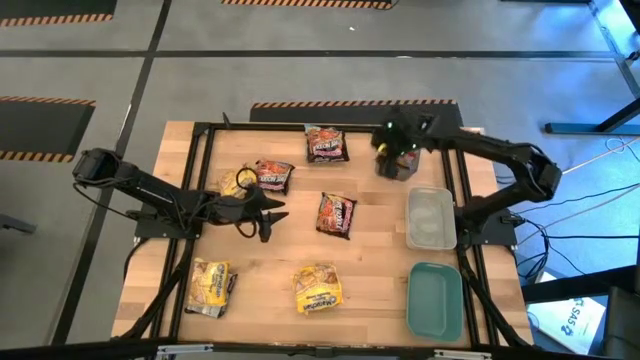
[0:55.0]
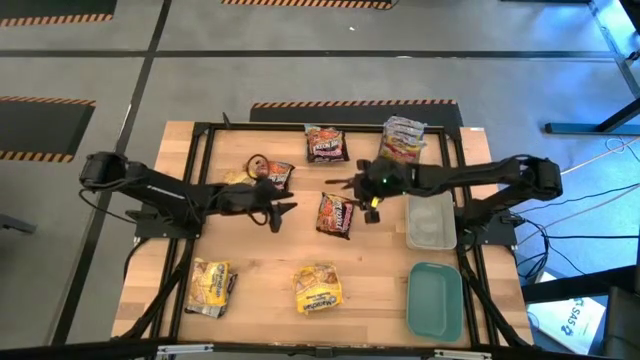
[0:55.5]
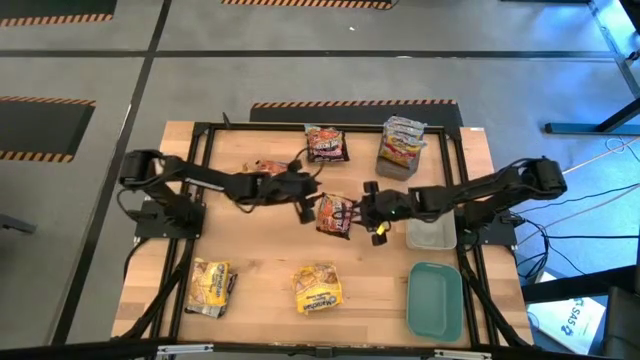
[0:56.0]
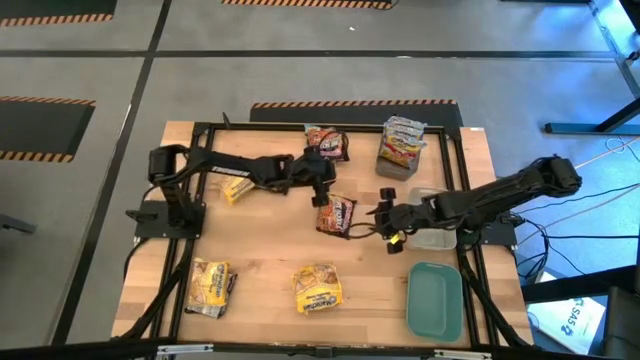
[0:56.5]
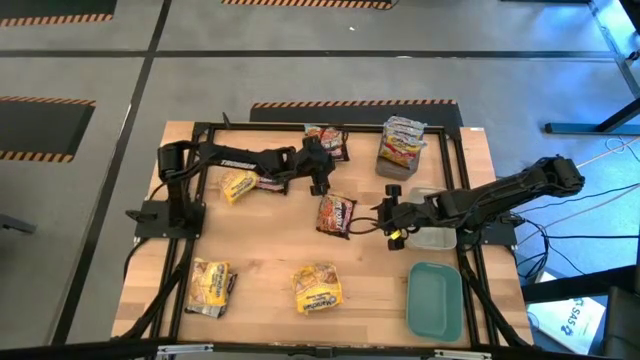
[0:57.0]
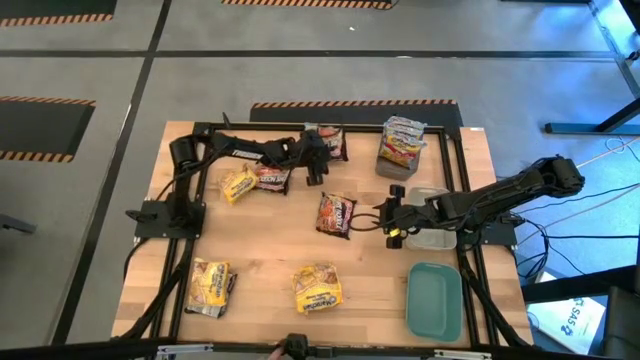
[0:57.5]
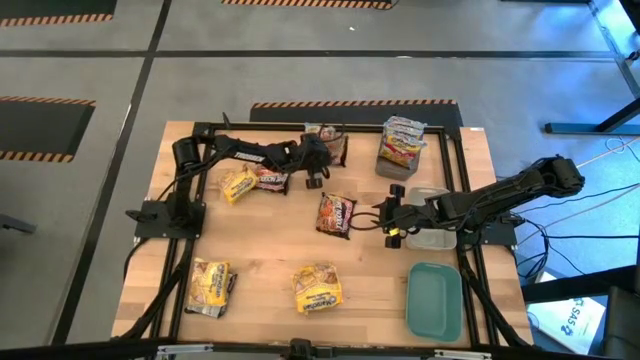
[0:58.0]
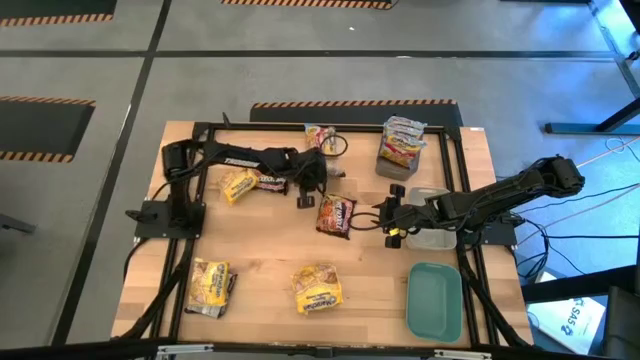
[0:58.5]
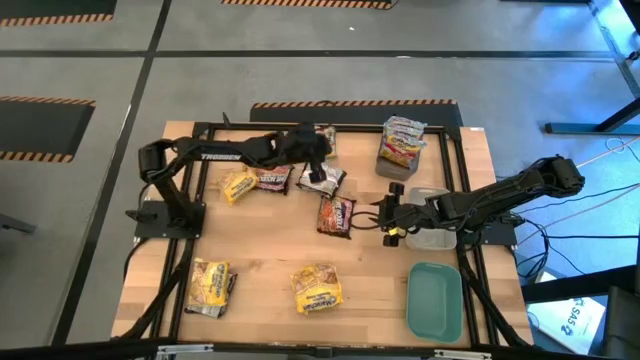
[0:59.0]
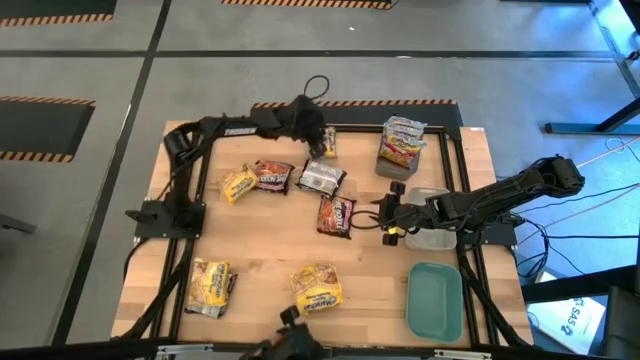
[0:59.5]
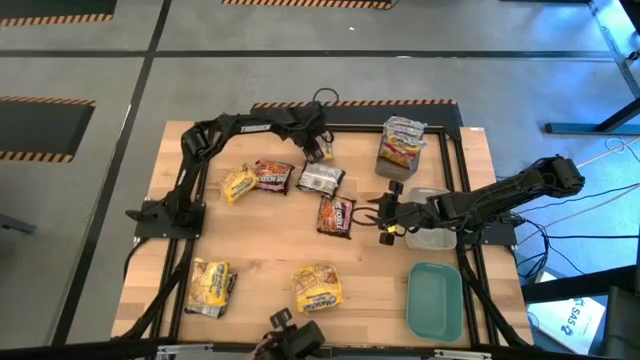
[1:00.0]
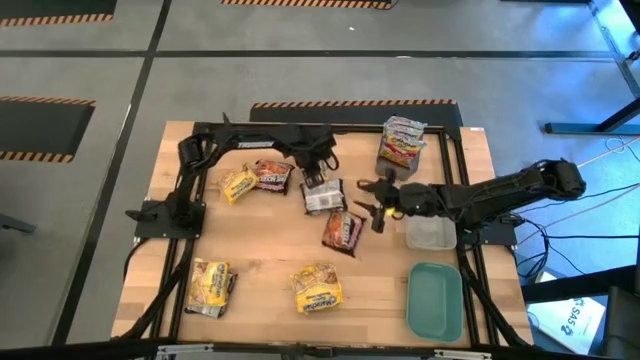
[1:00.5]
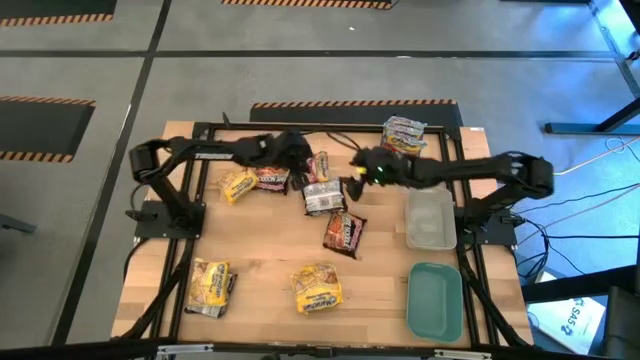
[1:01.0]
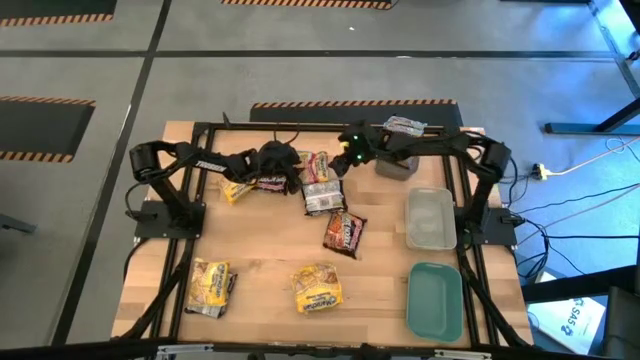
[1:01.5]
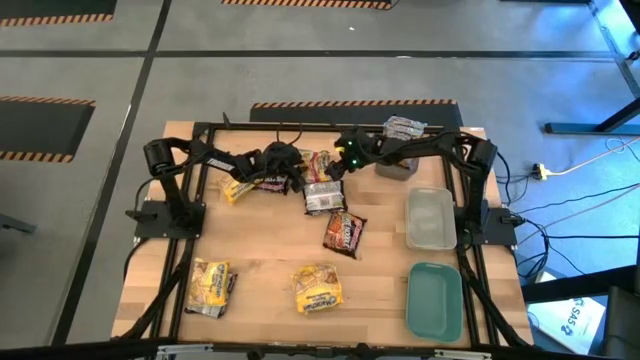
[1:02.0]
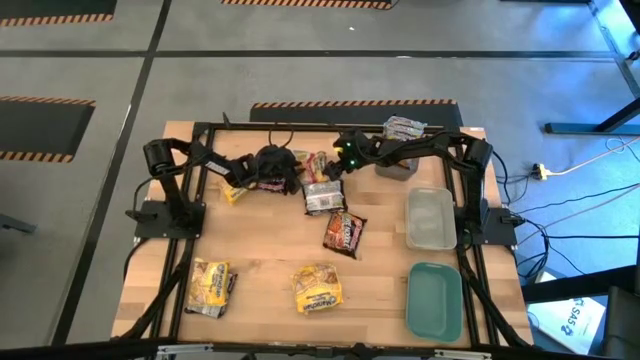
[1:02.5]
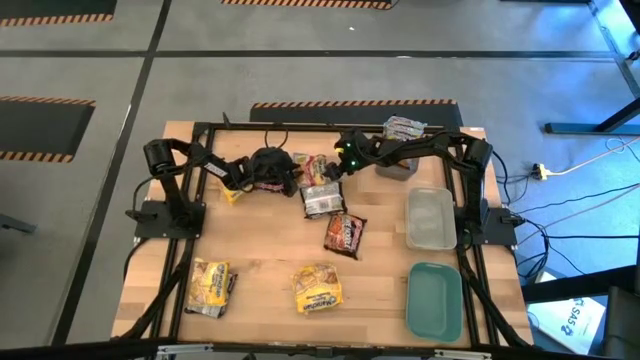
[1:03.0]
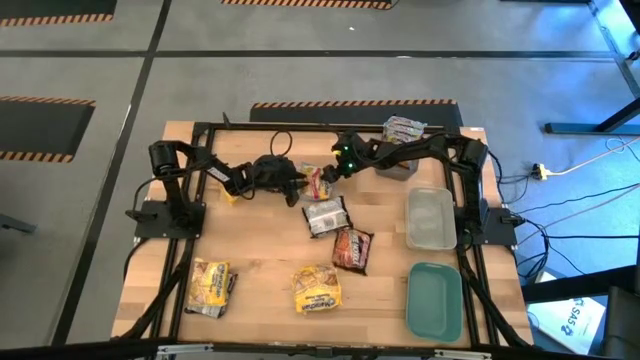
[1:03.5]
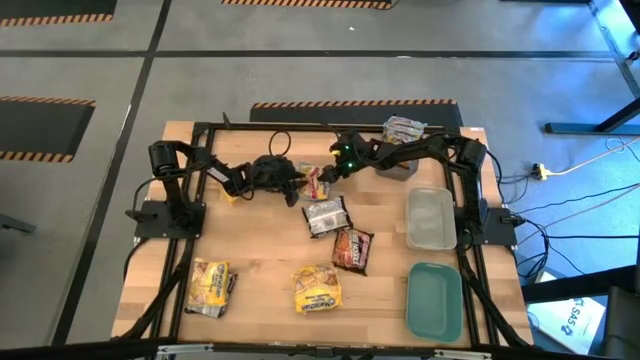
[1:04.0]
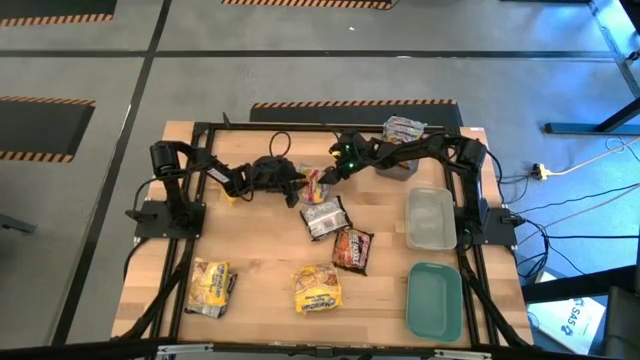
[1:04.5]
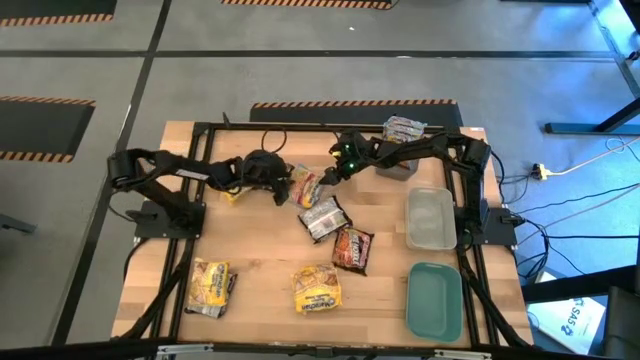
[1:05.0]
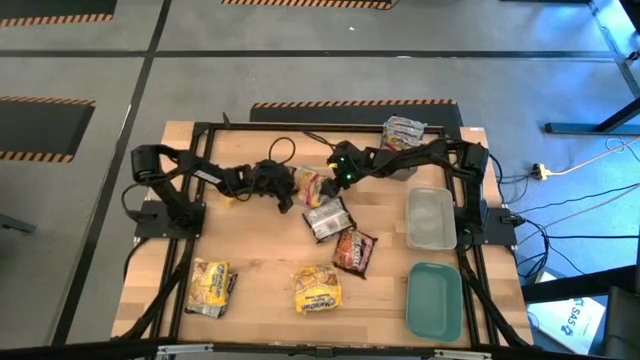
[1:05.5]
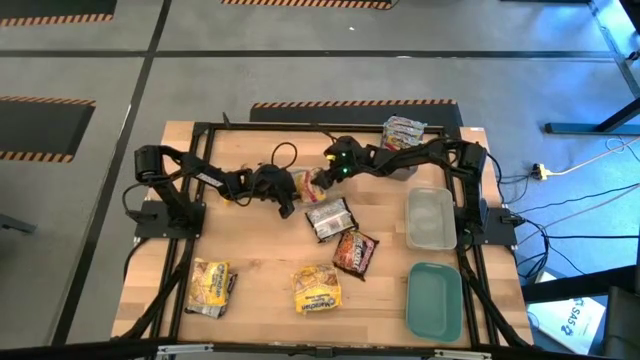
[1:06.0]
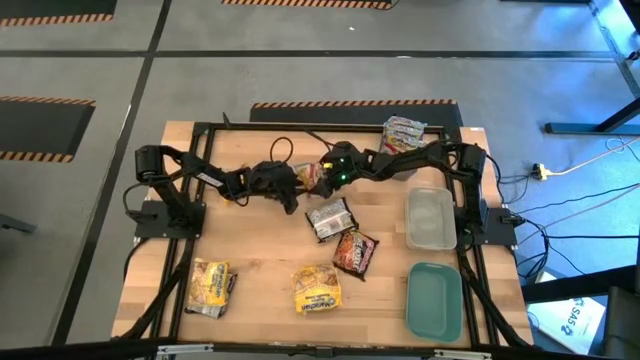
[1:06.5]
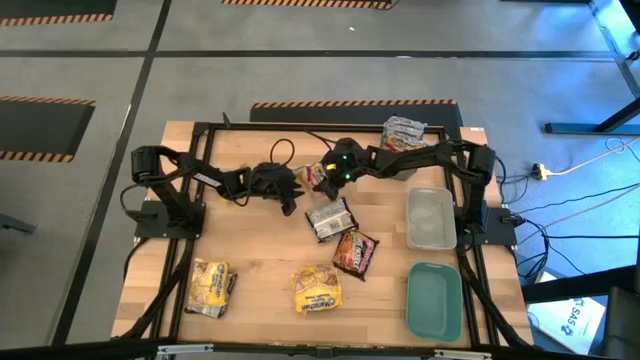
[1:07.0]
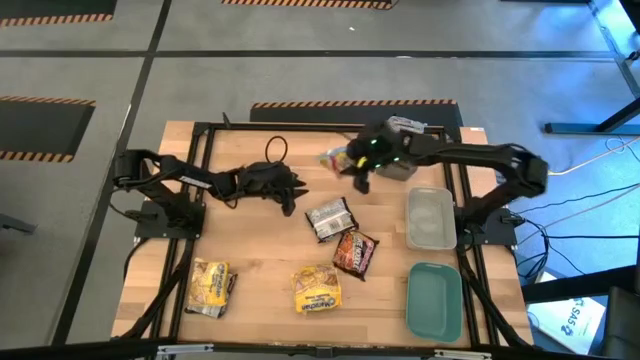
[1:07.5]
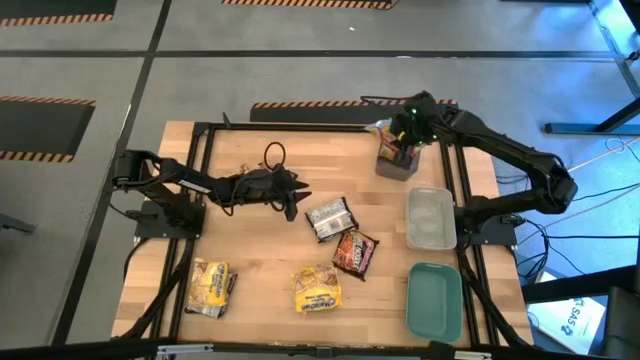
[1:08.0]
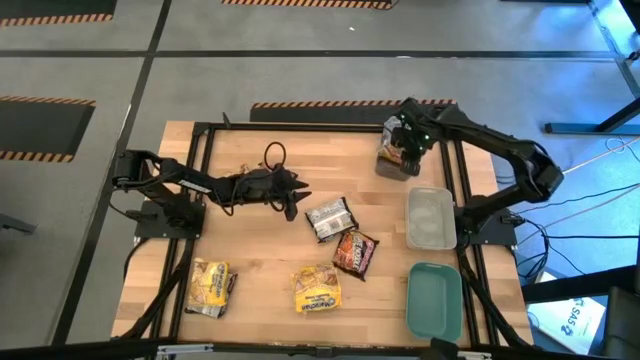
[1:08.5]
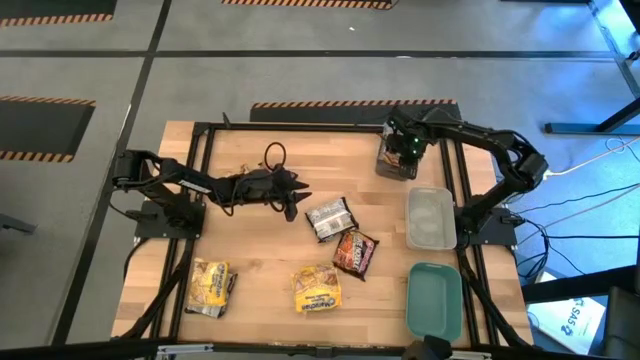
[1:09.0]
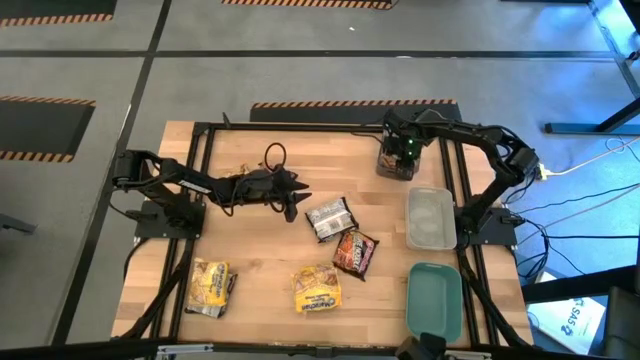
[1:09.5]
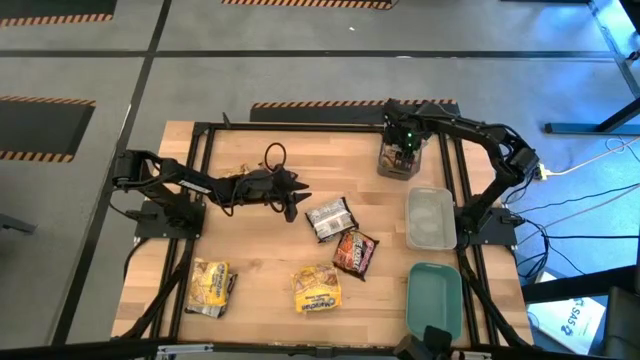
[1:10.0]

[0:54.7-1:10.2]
Task: Sort Maruchan noodles
Put the blue noodle pack into the black bin

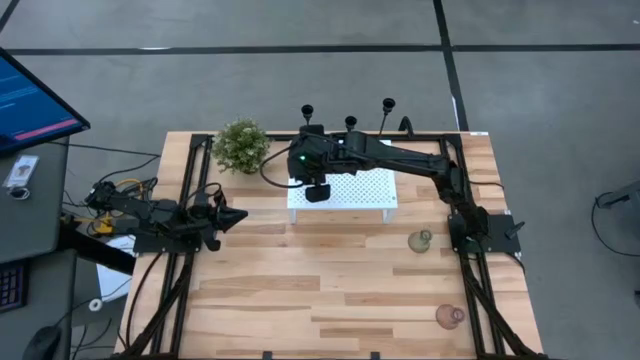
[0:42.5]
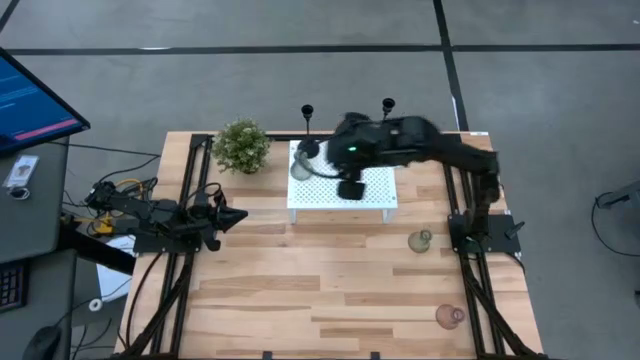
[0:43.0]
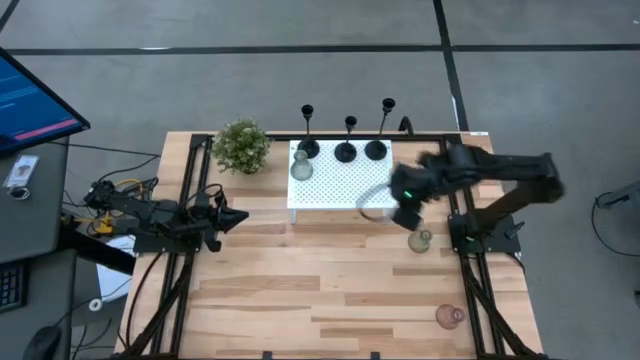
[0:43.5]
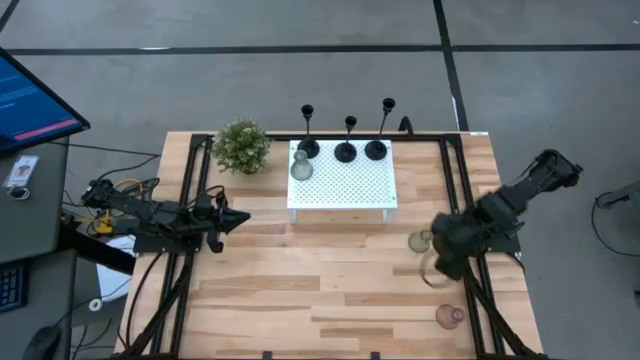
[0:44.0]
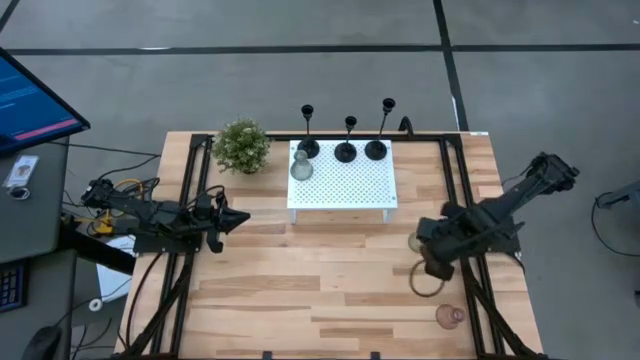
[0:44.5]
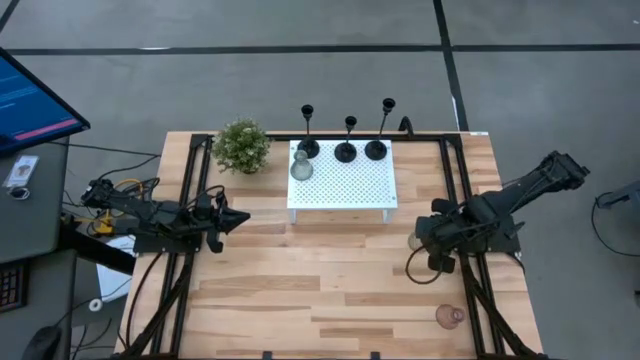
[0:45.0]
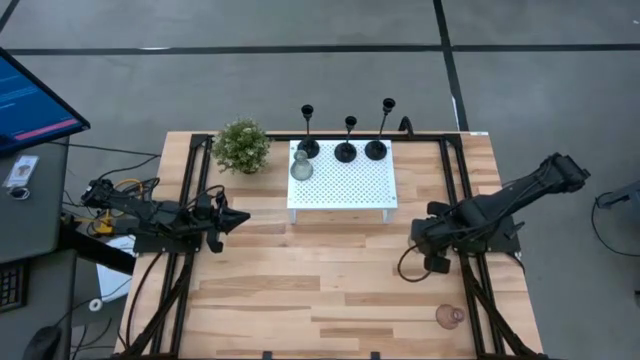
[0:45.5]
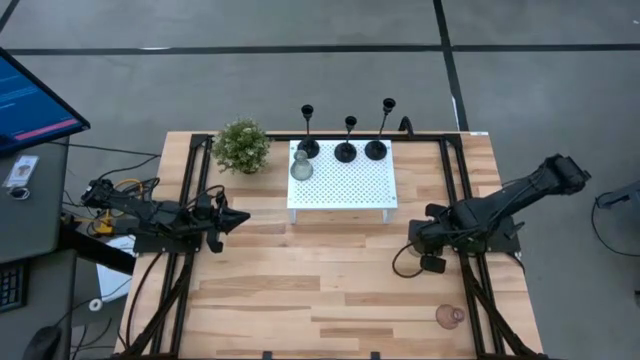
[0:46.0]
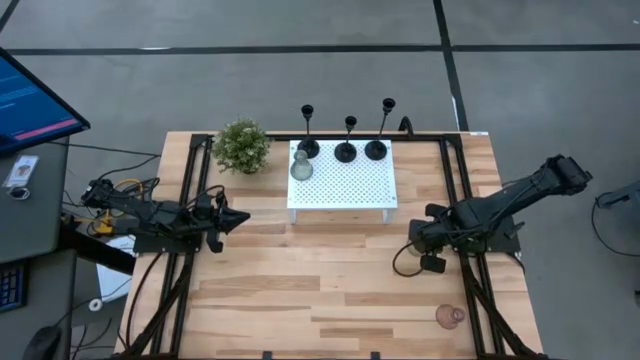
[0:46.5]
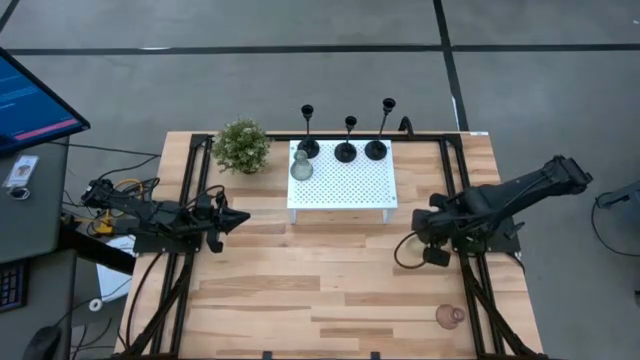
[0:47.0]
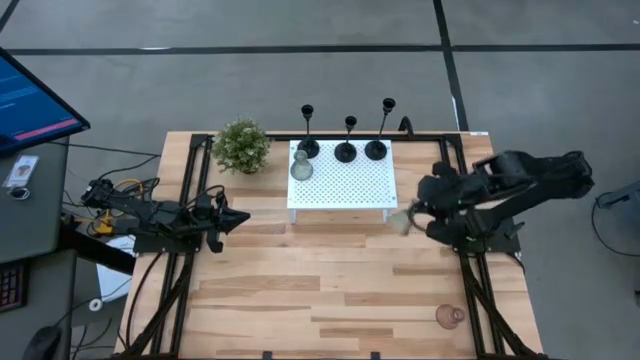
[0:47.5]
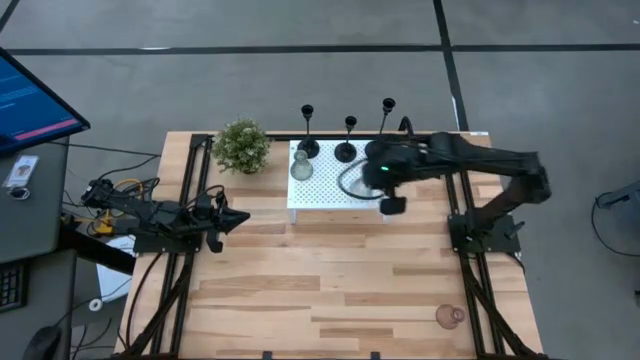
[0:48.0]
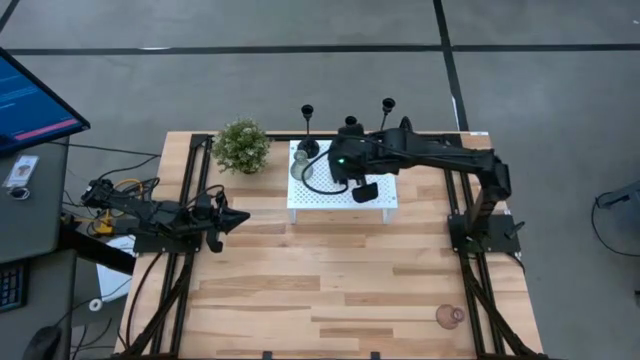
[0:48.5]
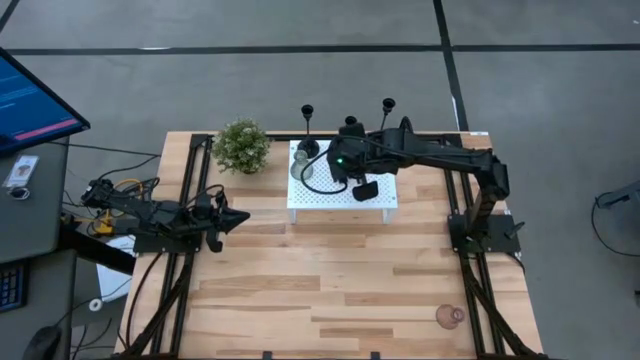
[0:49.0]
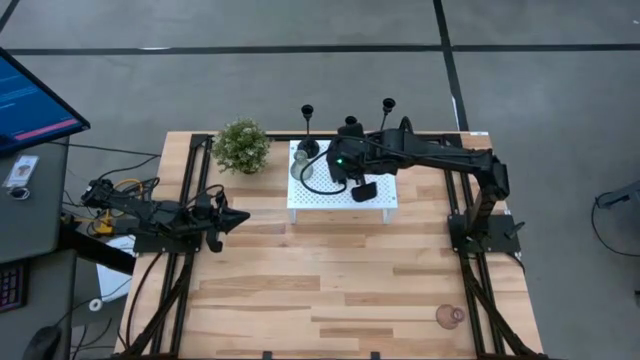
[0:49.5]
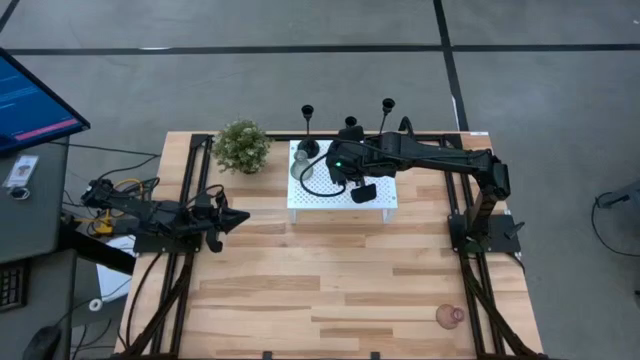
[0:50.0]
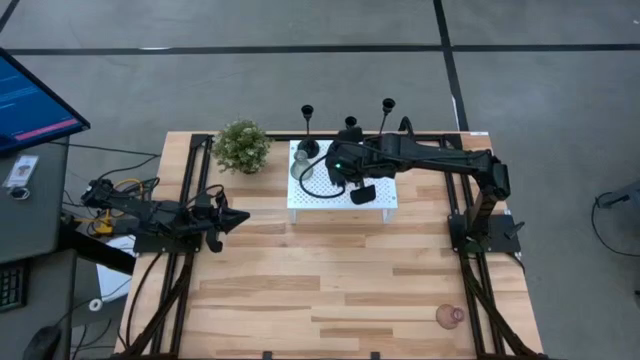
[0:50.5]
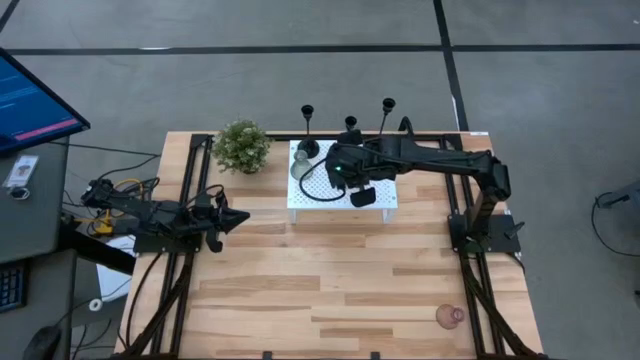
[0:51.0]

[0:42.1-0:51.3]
Task: Pick & Place candle stick holders
Put the green candle holder on the shelf aligned with the middle black candle holder
